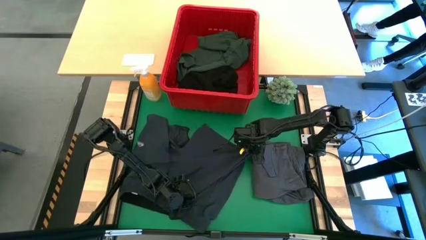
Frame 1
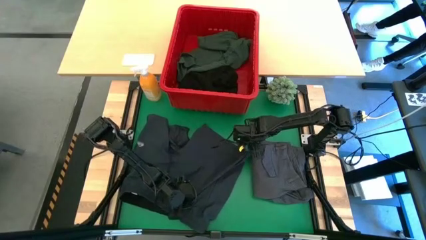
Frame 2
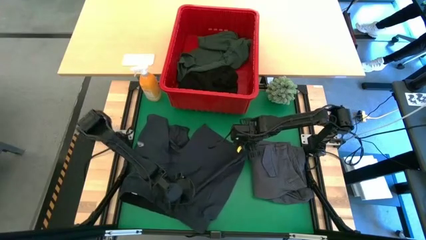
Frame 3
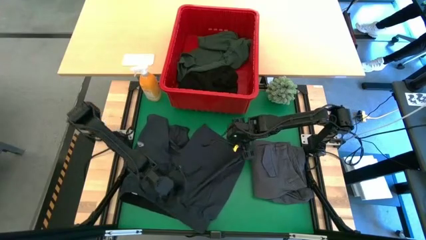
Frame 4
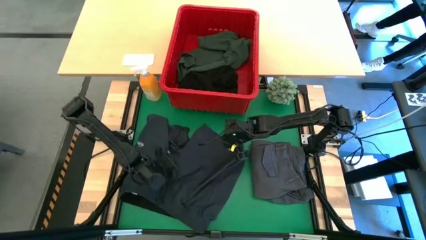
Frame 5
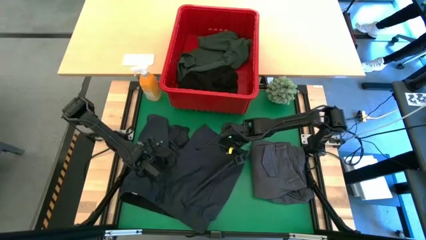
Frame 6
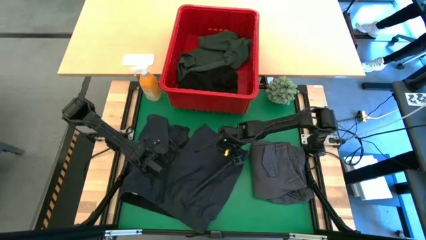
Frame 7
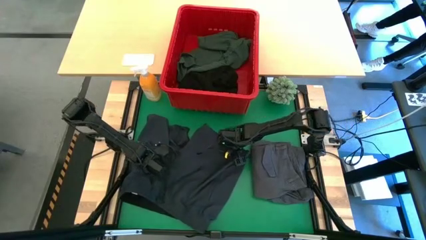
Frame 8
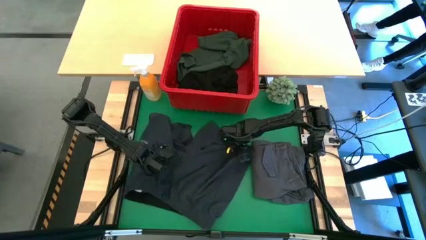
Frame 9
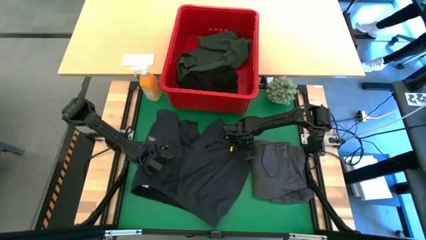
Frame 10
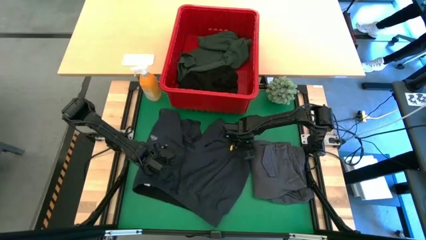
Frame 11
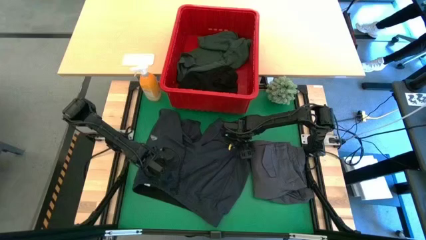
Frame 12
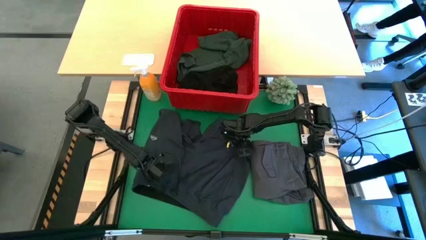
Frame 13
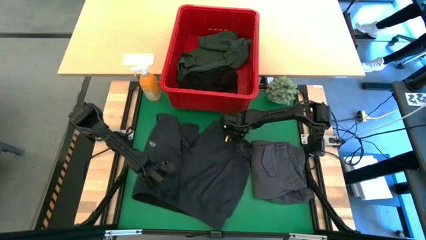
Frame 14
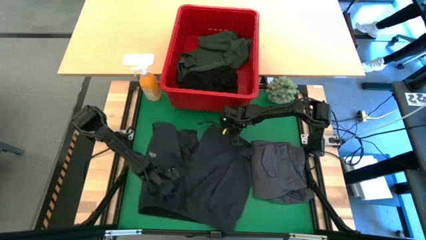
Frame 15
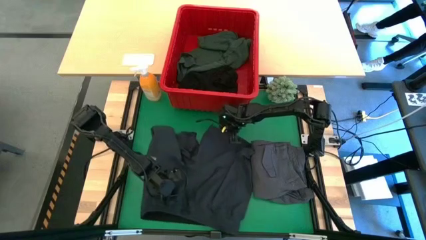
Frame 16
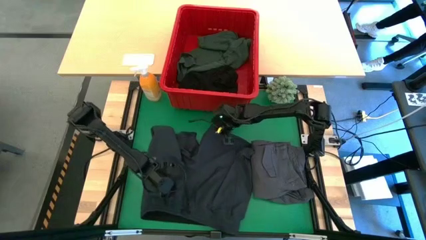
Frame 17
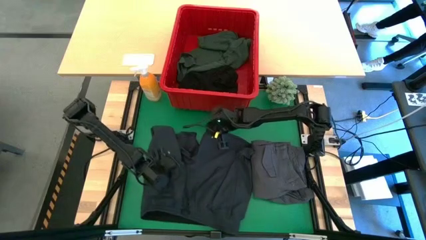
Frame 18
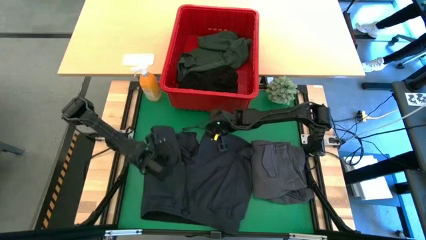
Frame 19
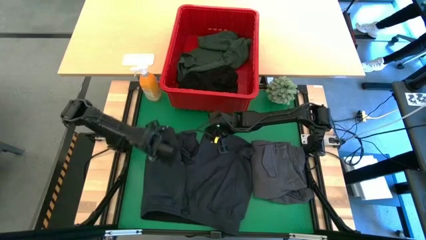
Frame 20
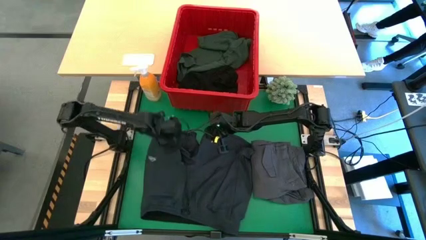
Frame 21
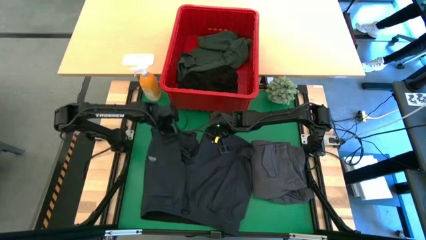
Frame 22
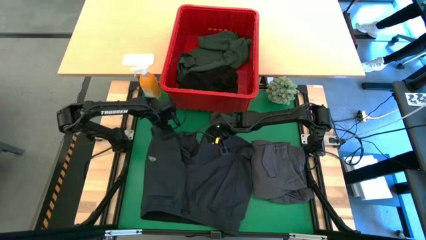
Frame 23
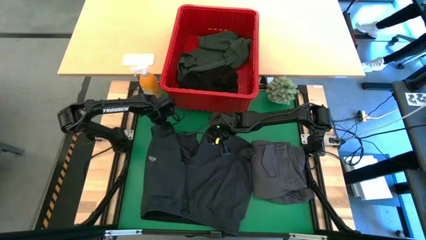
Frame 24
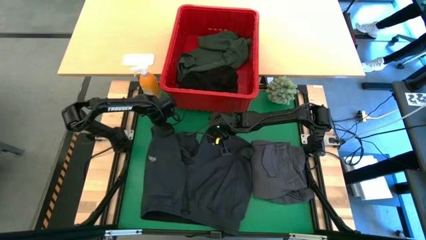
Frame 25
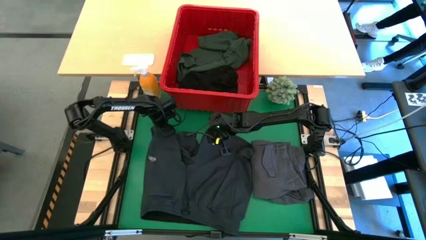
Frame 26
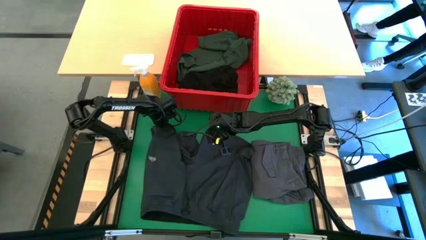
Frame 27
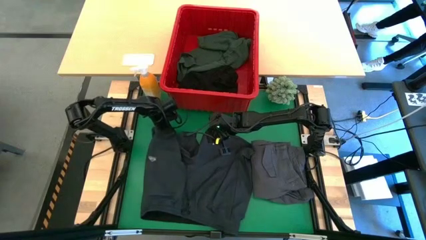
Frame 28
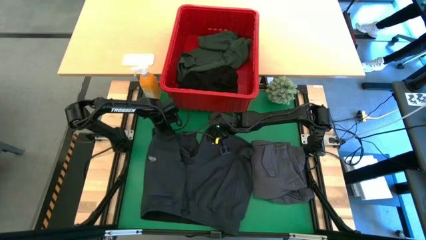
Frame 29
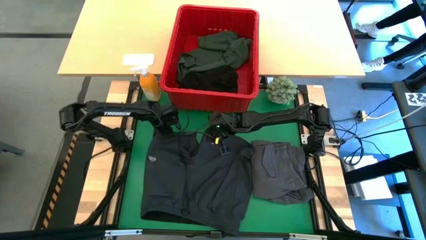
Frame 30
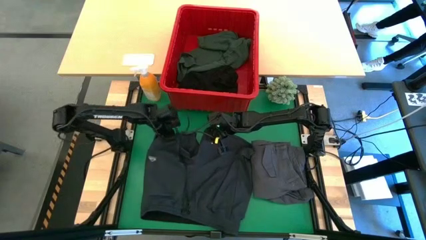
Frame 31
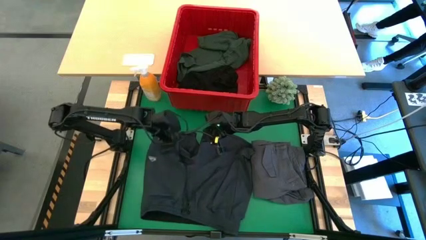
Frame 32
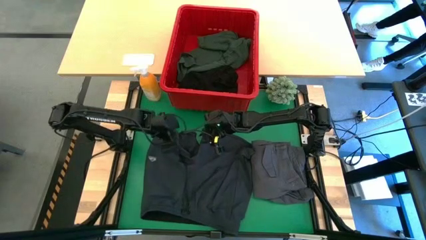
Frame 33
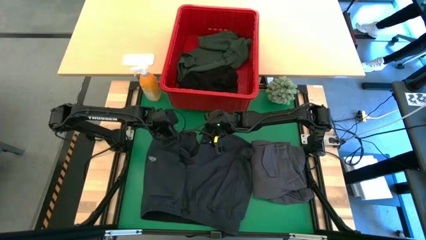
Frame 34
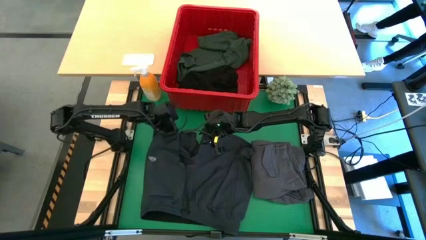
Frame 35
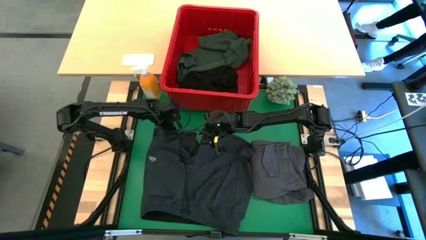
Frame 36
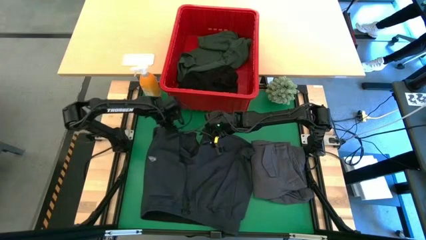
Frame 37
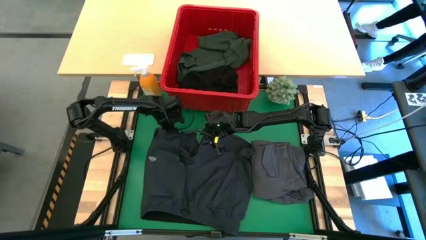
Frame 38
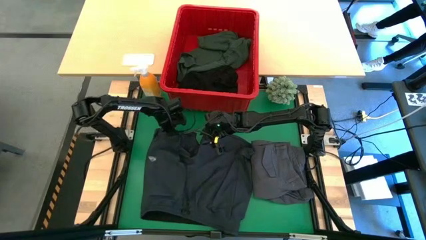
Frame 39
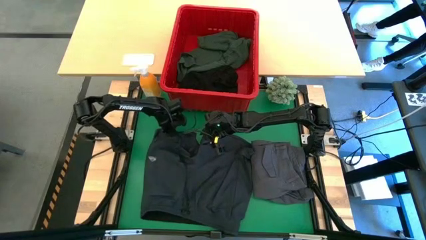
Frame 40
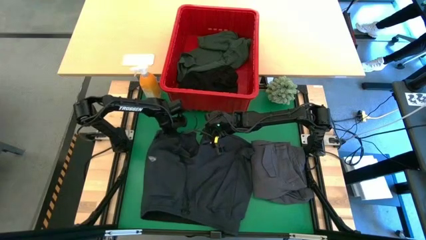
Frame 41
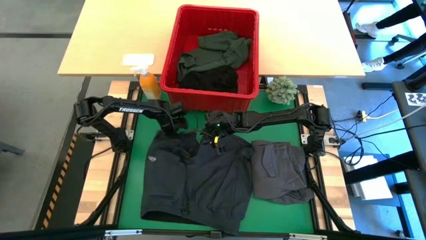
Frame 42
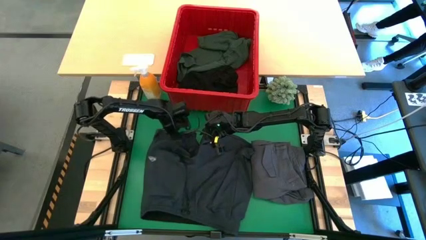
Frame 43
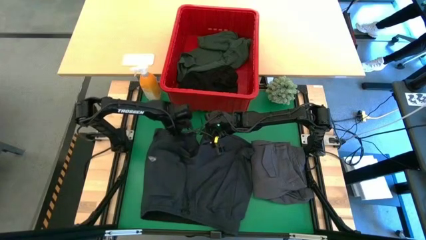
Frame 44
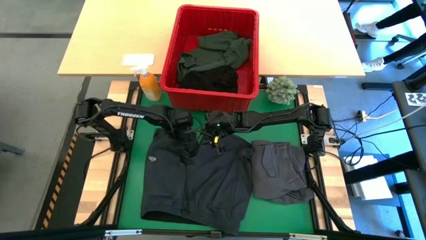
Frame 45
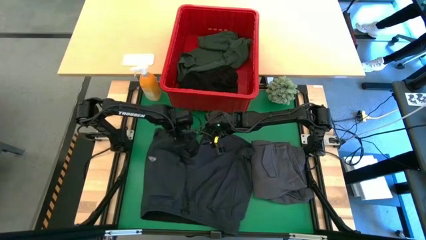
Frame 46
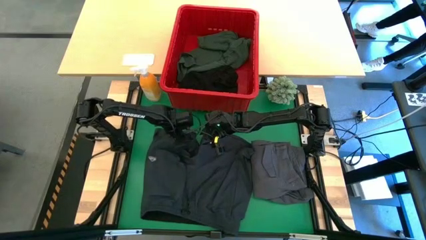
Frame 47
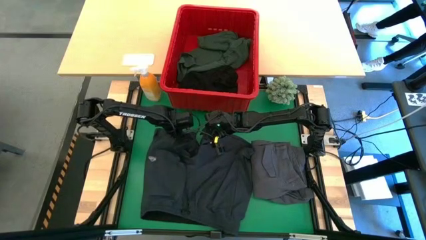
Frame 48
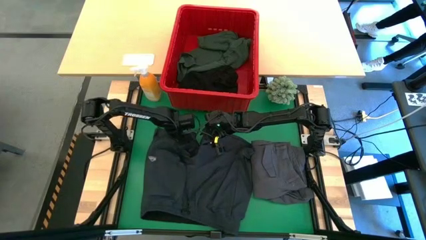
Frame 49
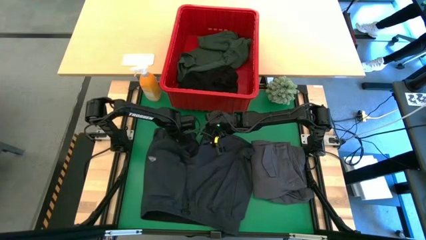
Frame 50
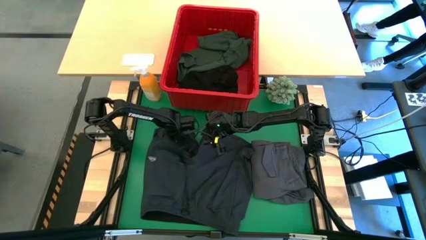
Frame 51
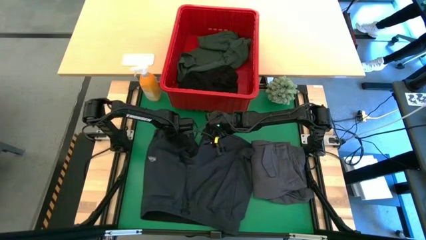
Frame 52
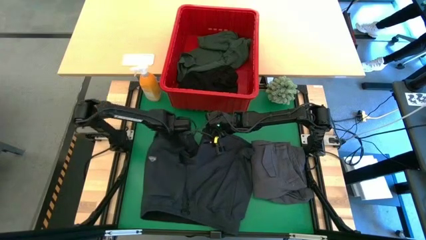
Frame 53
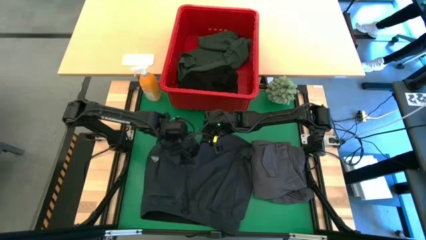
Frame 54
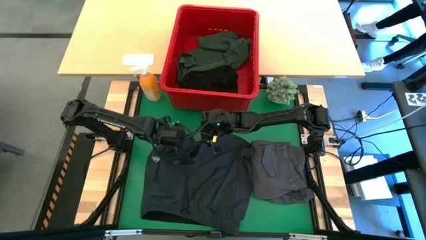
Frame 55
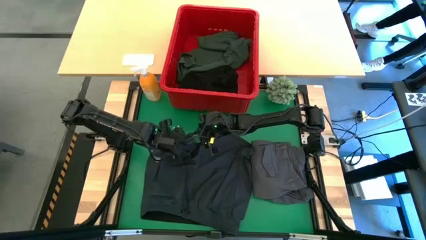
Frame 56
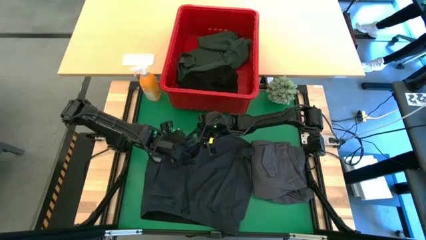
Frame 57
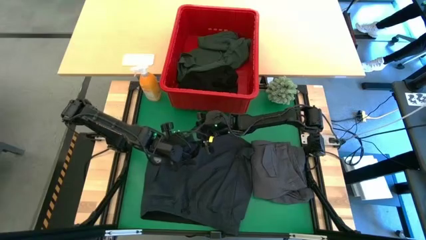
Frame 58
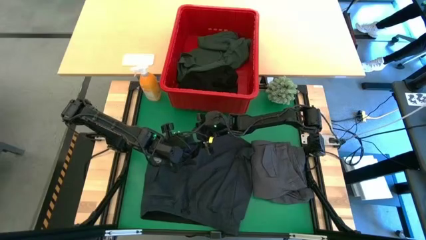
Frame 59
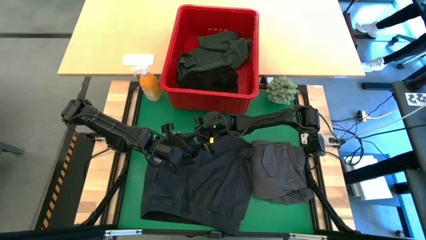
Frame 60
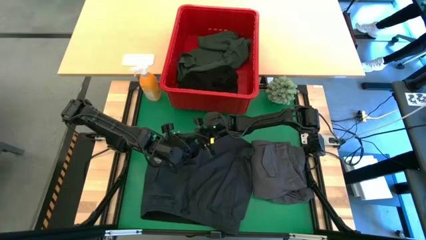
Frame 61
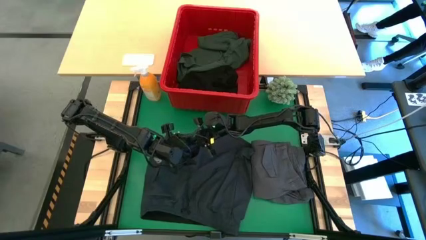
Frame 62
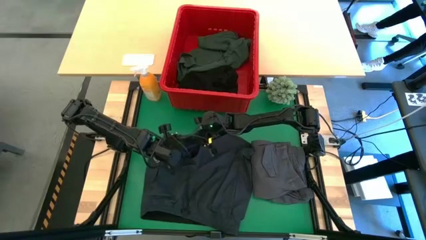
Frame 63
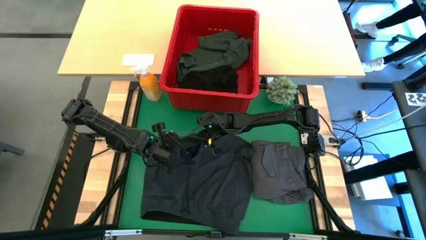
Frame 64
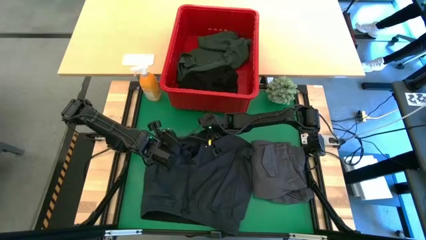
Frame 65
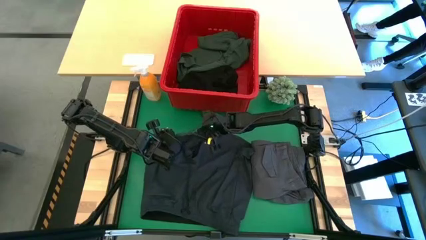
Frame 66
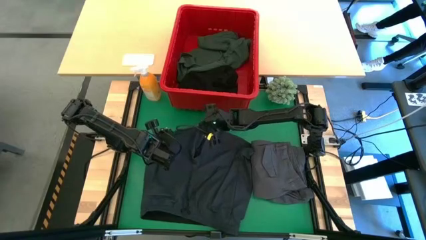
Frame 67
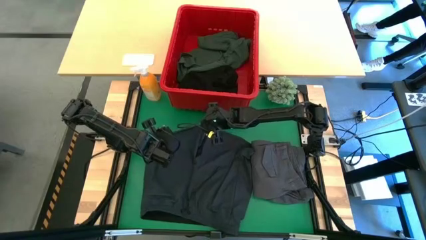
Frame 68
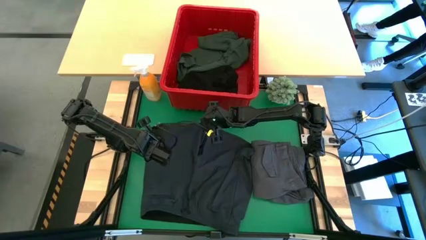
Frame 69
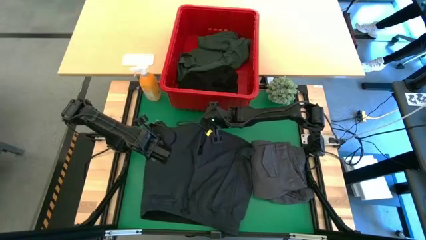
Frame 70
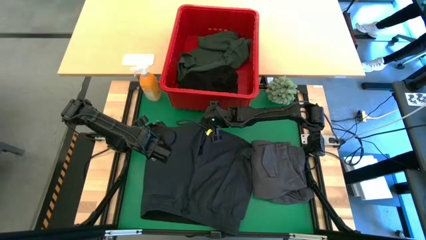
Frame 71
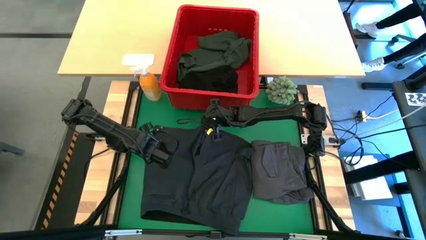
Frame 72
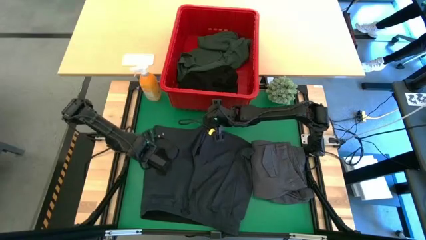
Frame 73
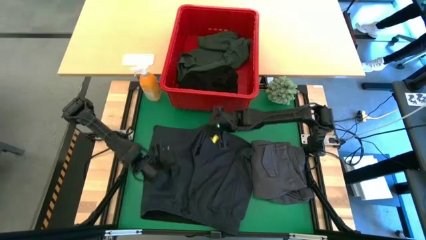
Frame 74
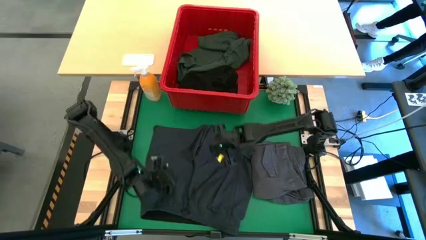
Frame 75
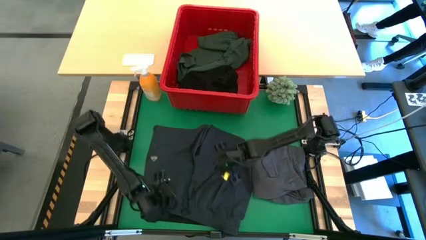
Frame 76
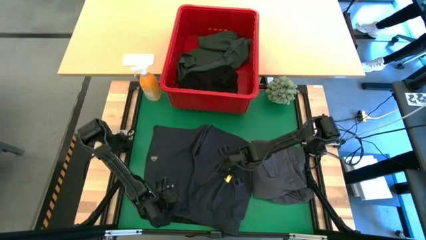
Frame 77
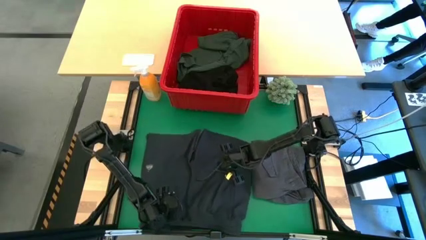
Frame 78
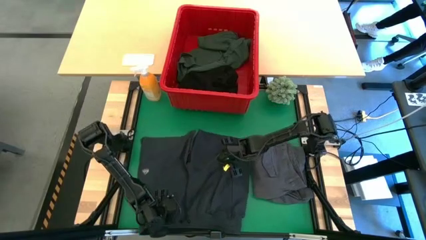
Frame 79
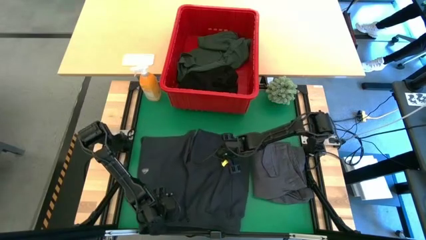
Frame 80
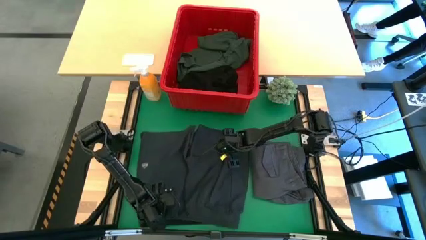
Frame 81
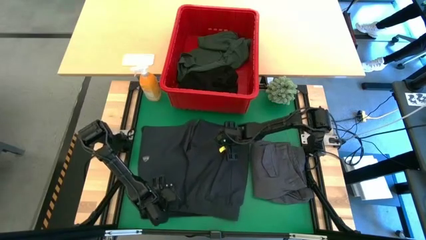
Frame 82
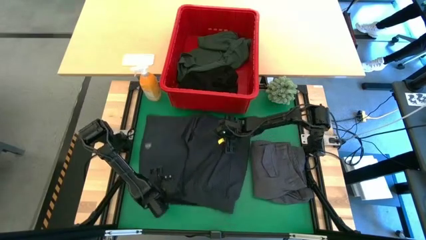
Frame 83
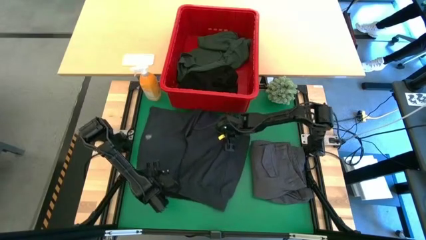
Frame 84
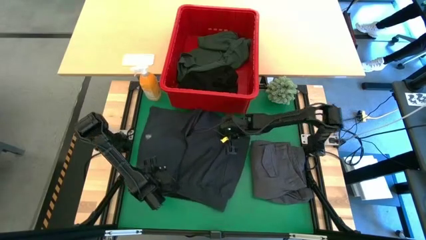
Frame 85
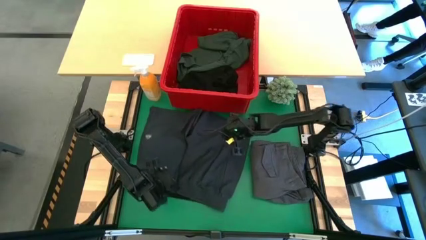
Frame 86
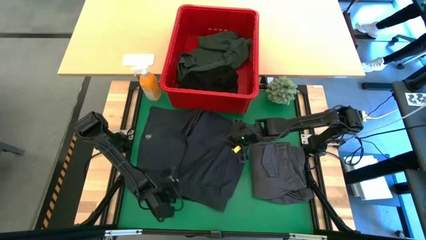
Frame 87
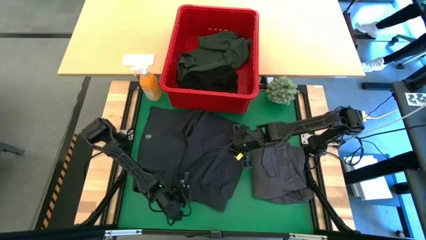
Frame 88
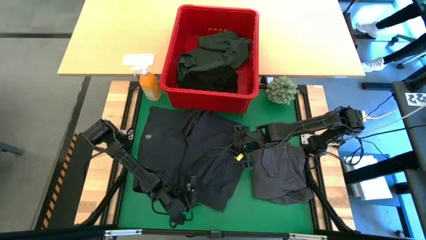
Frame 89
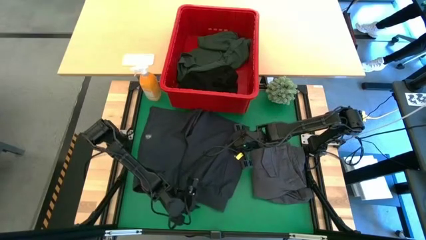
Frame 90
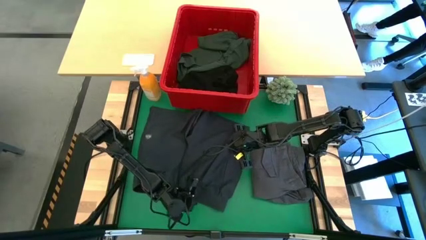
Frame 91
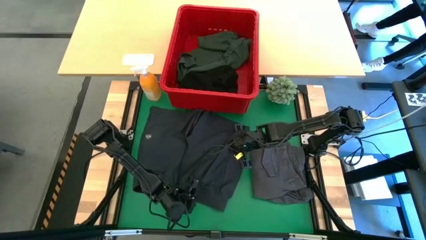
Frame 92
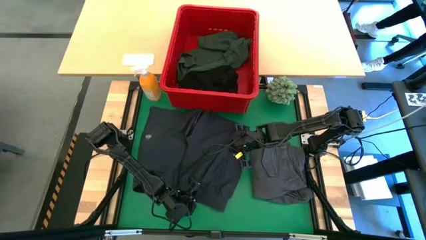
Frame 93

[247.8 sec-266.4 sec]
Task: Fold Laundry from Bin
Fold the dark gray short
